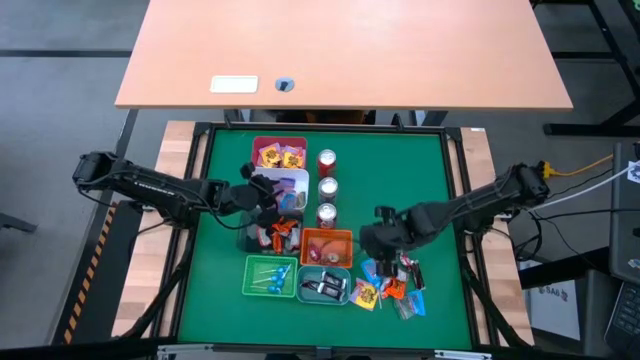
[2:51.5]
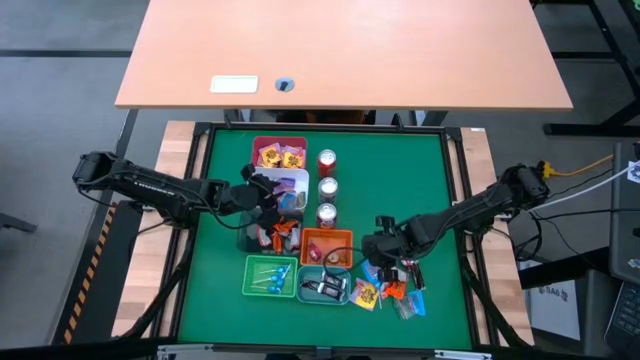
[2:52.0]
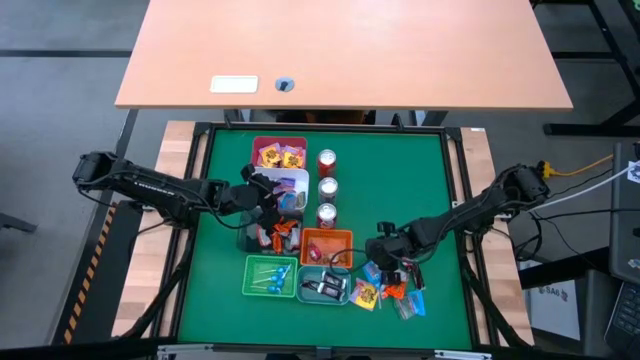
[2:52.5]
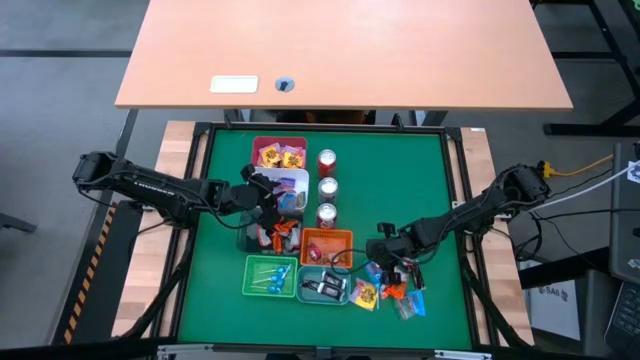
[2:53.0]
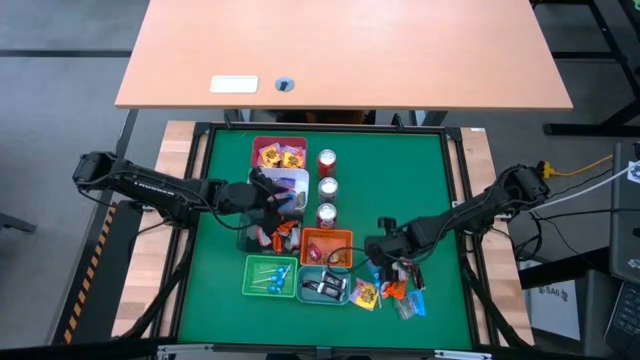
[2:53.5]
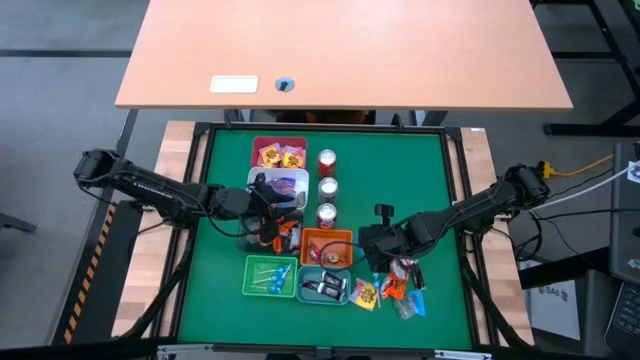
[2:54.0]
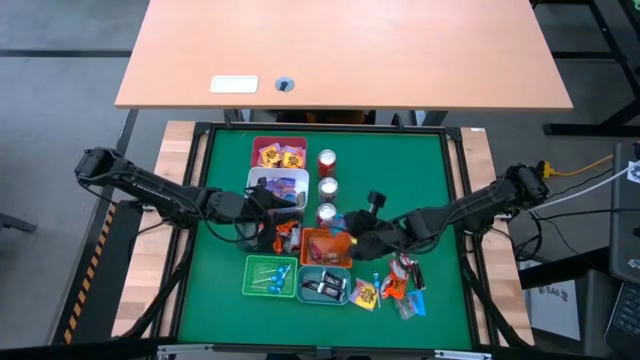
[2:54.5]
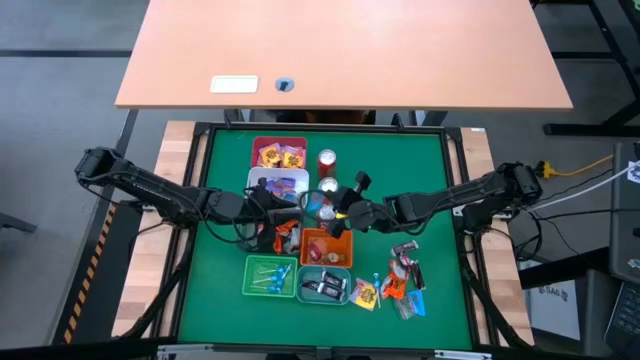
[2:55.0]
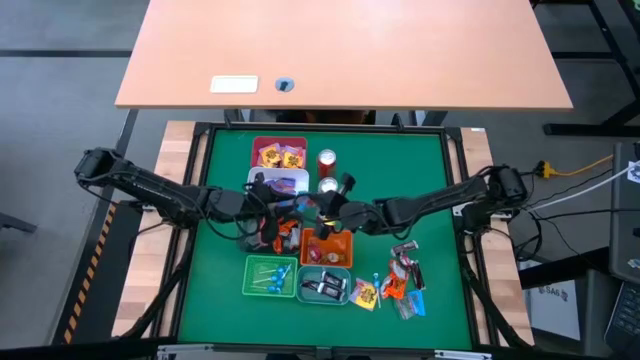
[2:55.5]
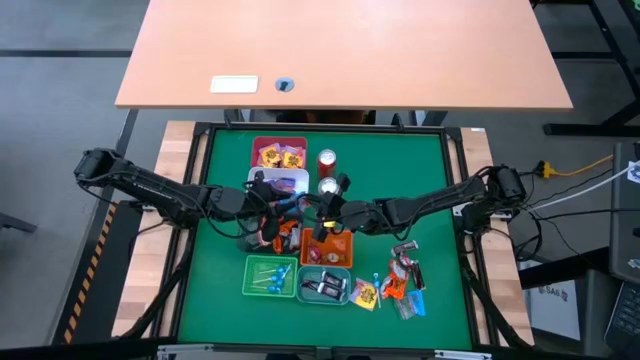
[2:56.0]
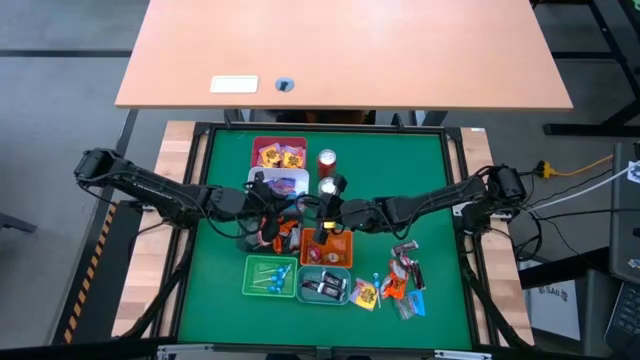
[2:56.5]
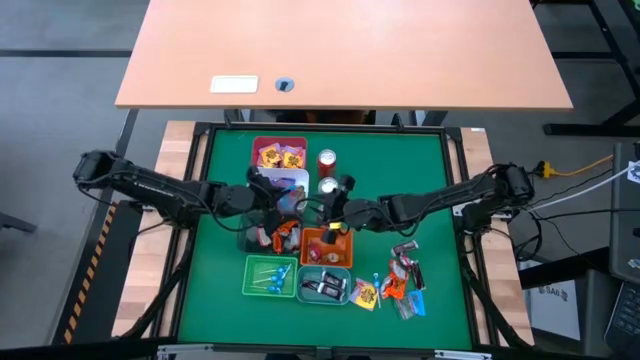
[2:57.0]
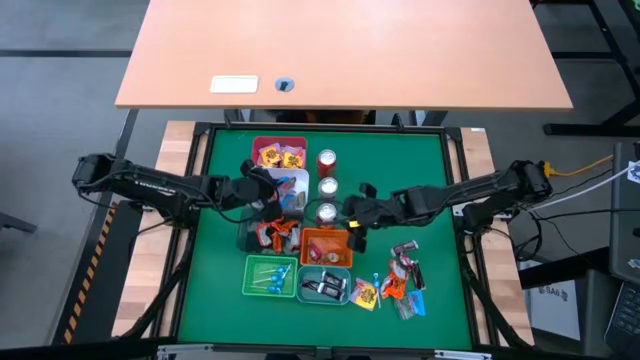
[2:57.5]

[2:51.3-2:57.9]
Task: Sort candy
Put the violet candy into the white bin

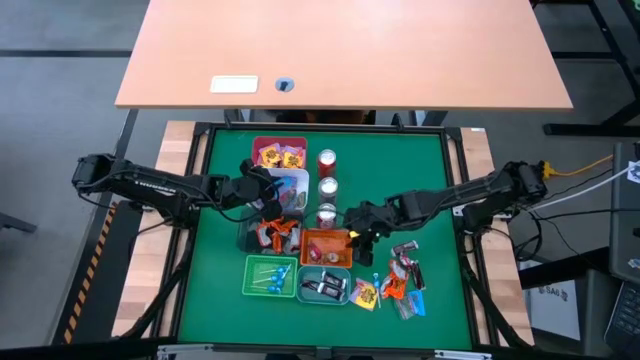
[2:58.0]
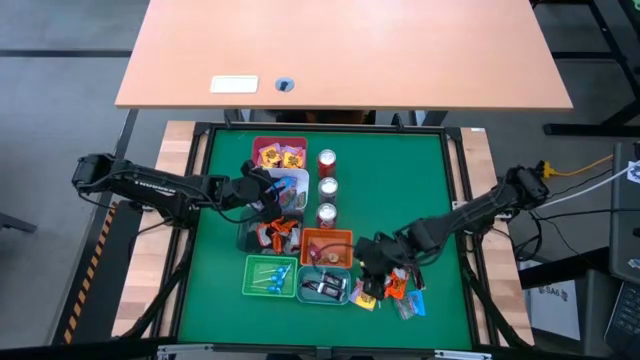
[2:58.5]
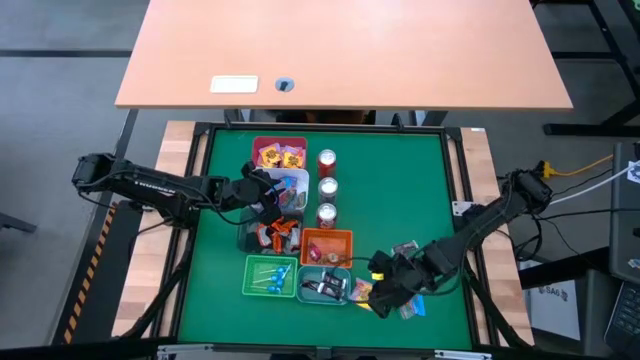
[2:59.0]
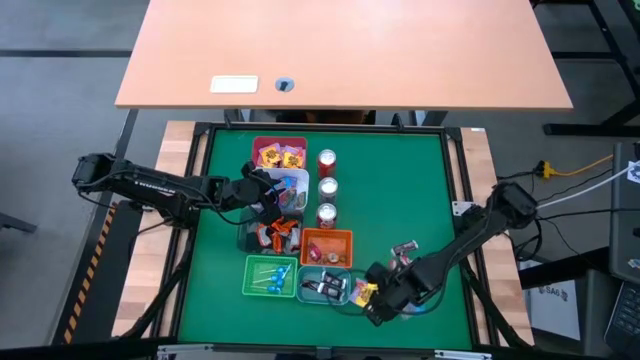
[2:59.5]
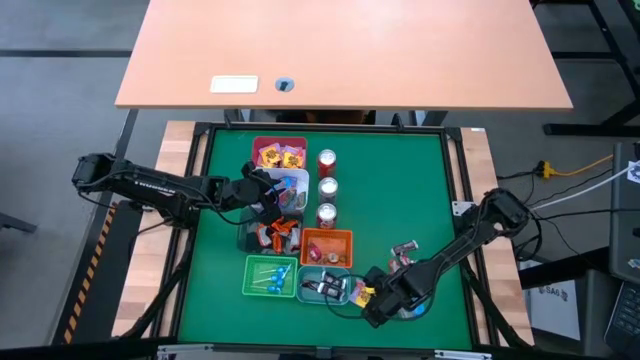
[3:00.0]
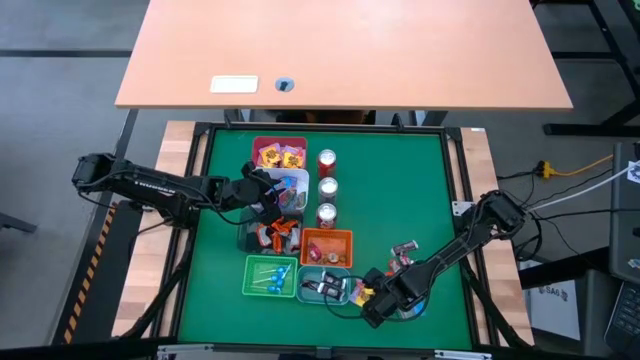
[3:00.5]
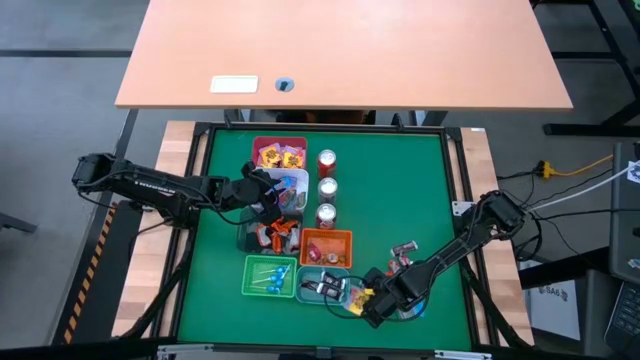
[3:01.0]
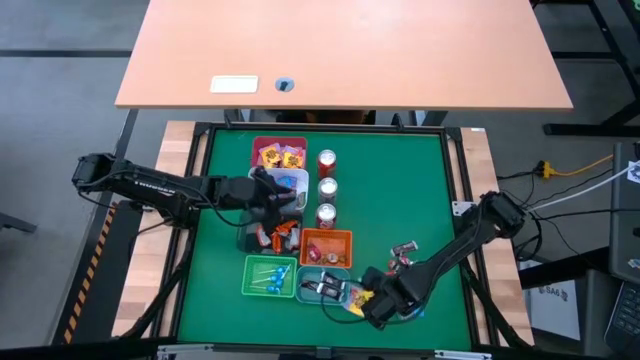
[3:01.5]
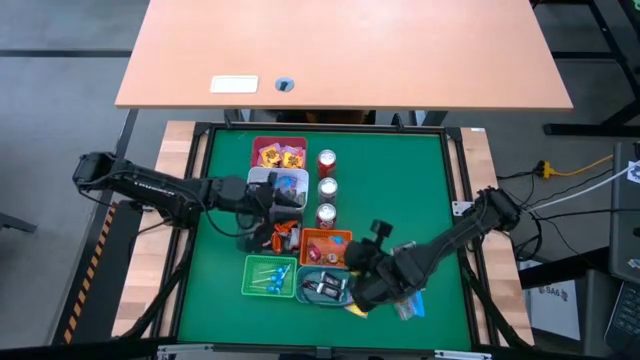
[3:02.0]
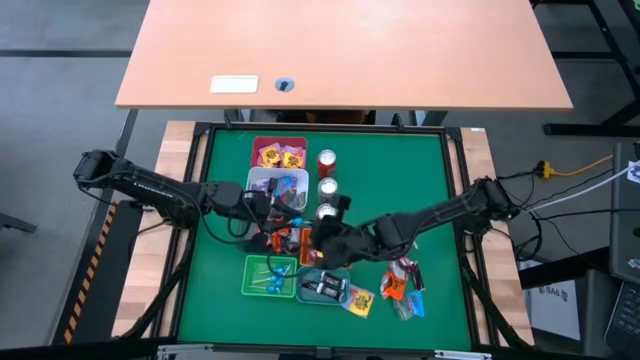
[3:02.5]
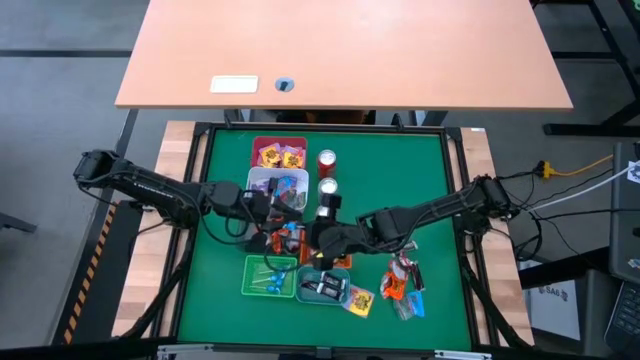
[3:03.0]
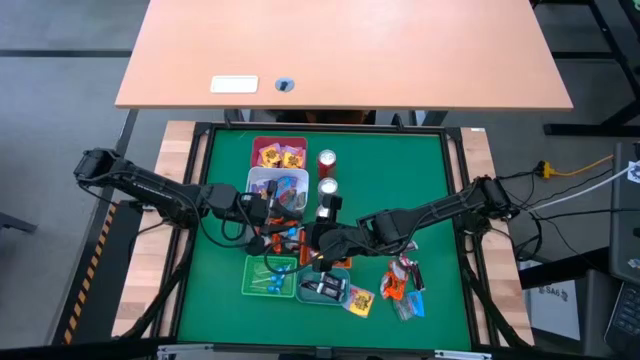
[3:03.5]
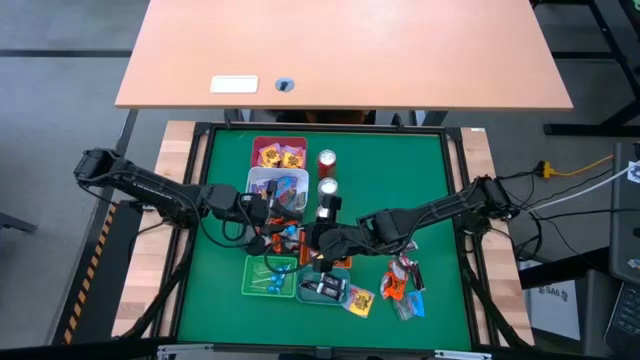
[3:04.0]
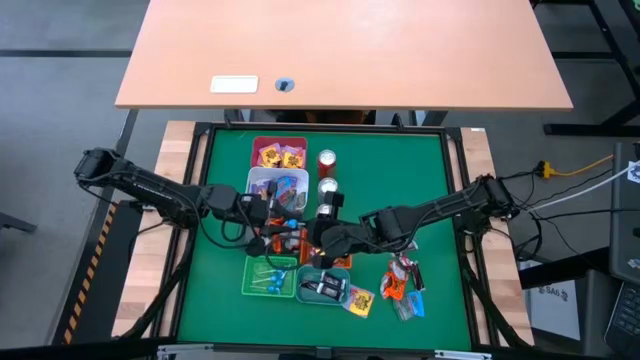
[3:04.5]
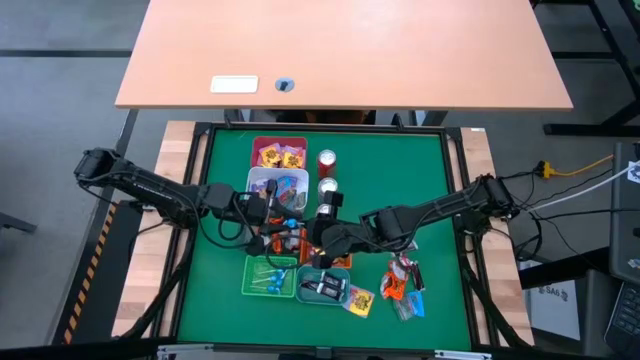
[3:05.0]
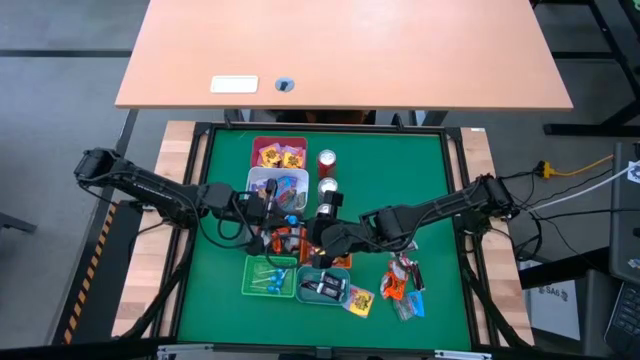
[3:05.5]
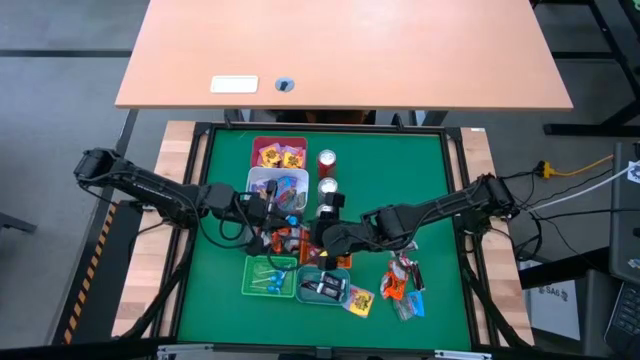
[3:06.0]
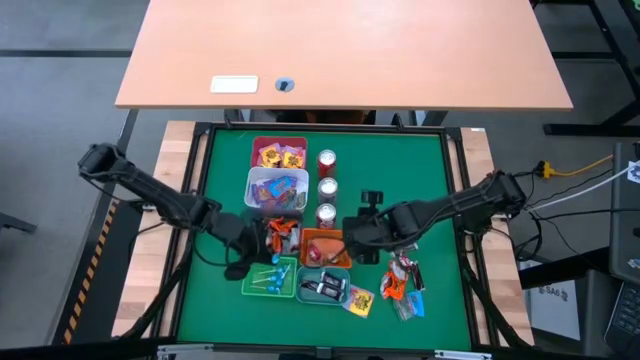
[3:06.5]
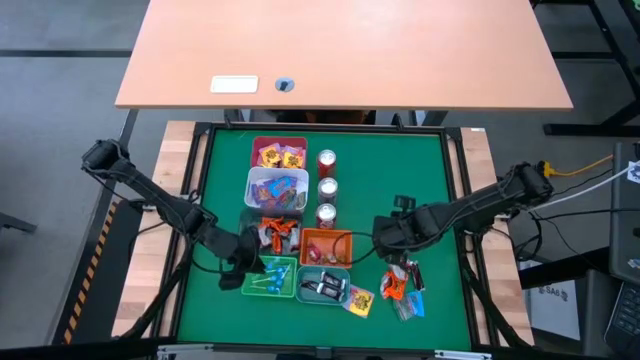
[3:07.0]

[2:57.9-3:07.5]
Put the blue candy into the green bin

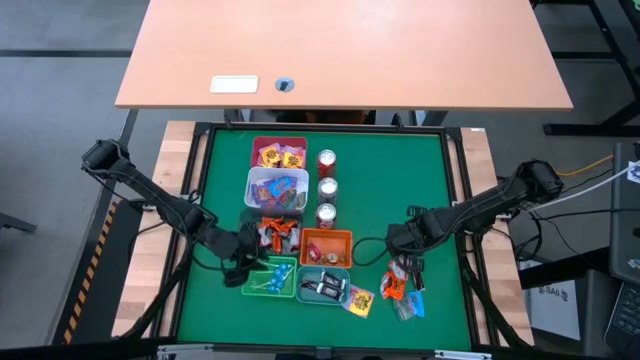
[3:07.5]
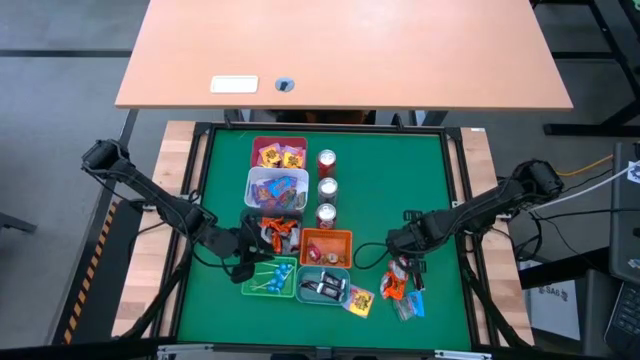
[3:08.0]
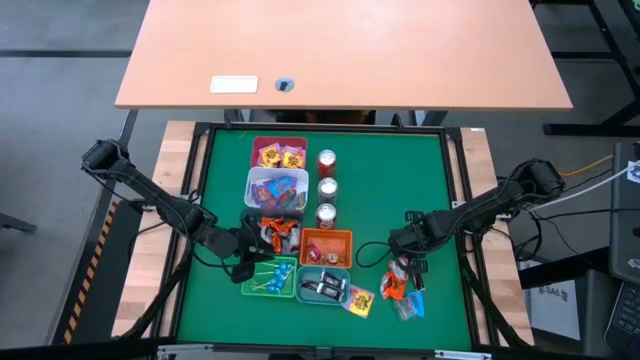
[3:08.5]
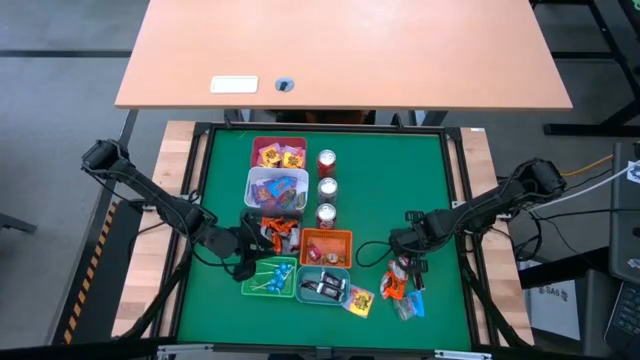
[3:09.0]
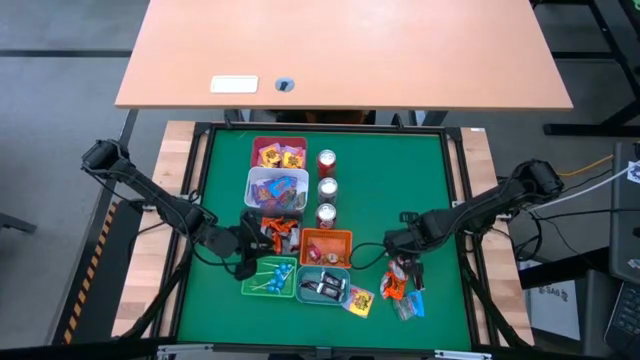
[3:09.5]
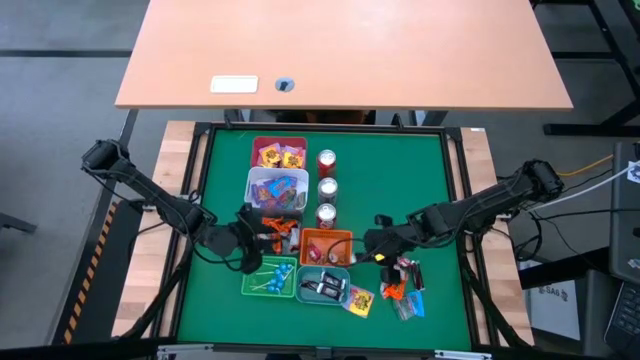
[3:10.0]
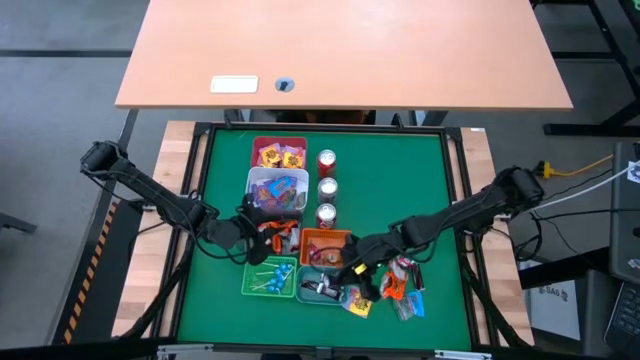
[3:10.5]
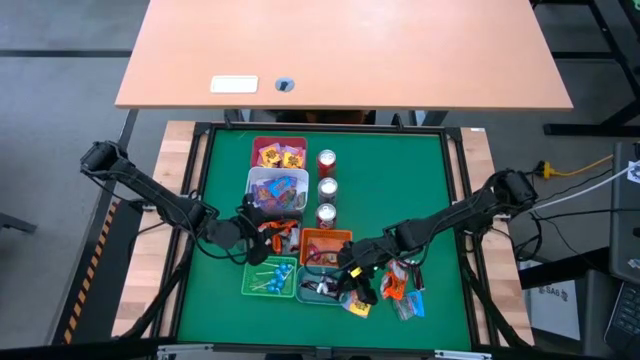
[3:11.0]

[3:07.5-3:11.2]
Put the brown candy into the teal green bin

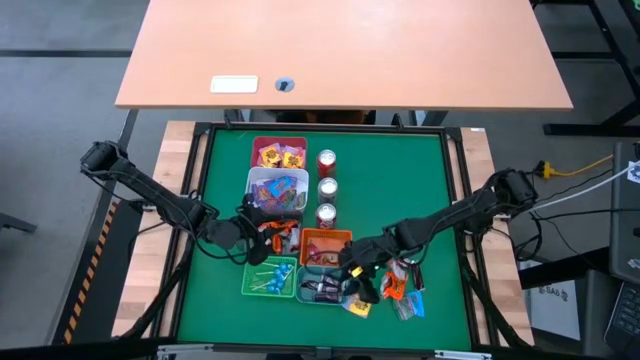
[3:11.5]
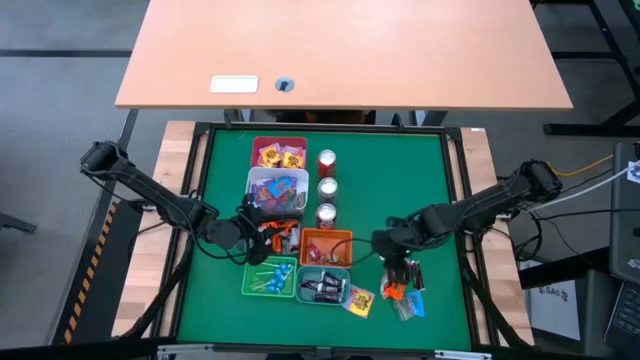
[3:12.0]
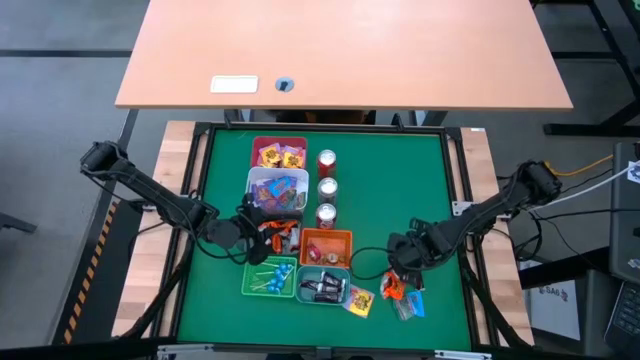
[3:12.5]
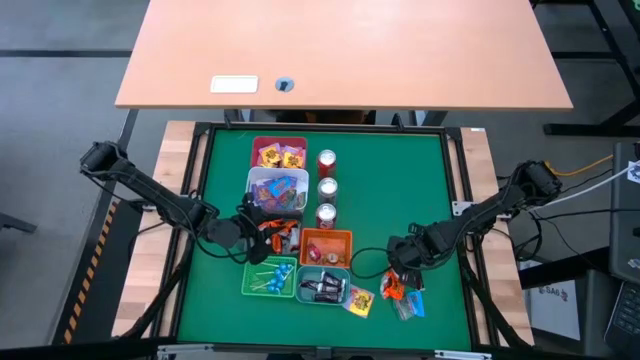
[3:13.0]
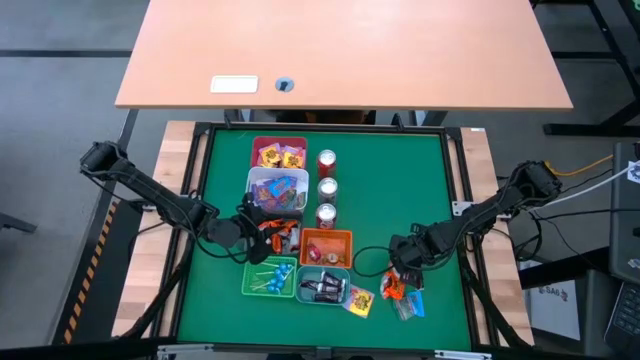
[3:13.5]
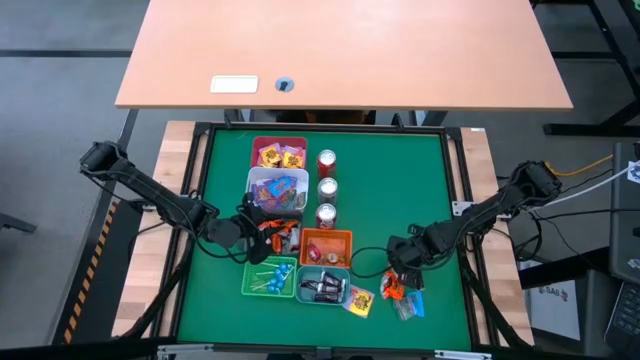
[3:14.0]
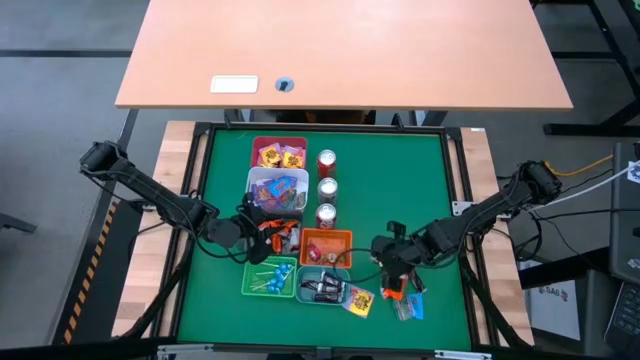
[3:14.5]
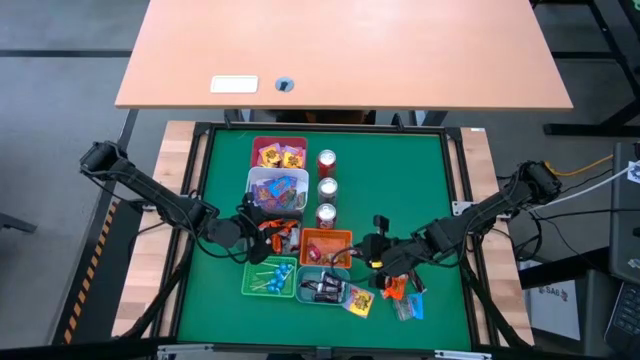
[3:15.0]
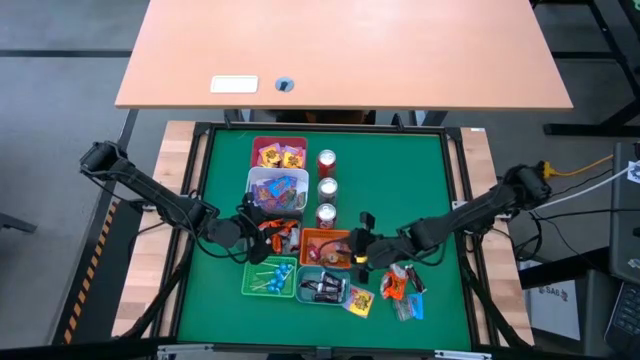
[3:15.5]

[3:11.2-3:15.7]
Put the red candy into the center orange bin
